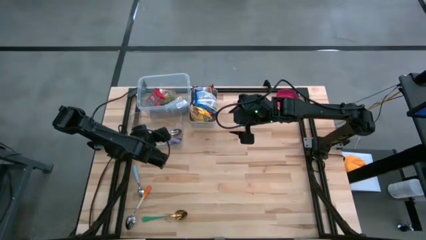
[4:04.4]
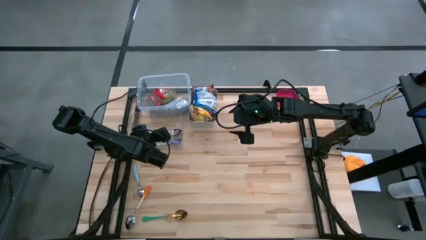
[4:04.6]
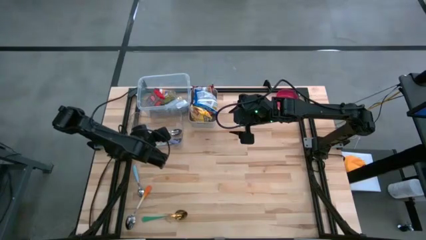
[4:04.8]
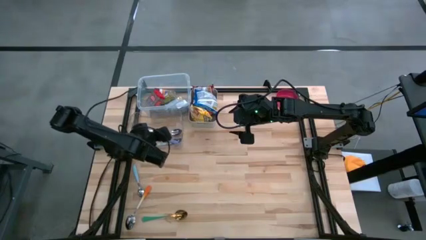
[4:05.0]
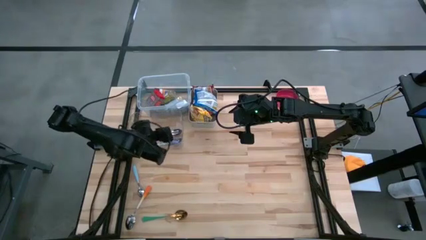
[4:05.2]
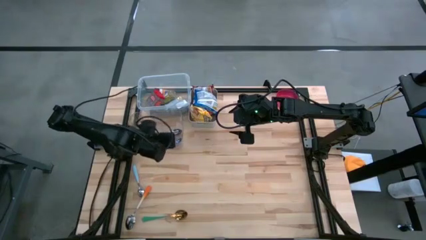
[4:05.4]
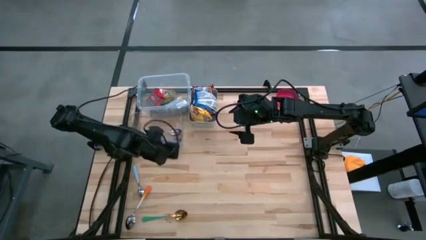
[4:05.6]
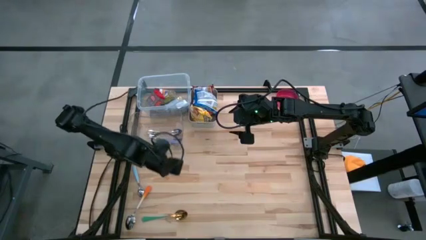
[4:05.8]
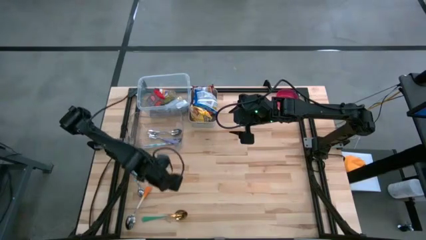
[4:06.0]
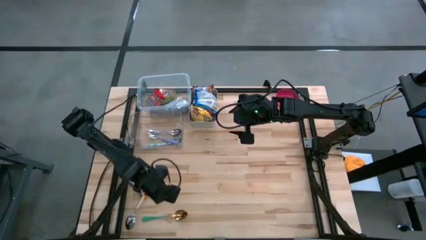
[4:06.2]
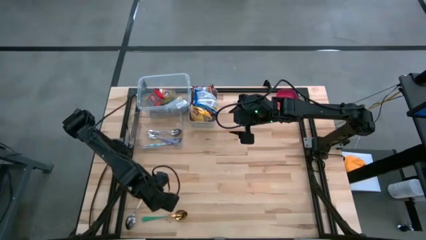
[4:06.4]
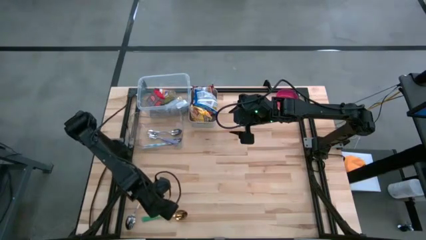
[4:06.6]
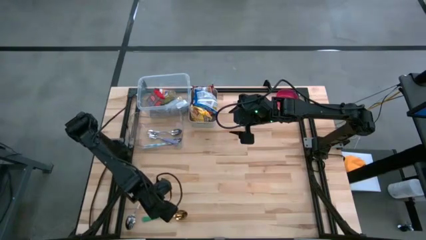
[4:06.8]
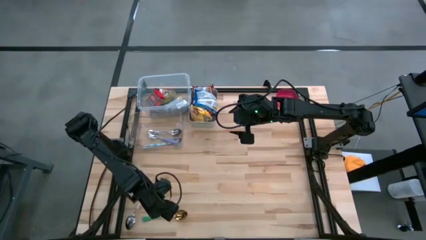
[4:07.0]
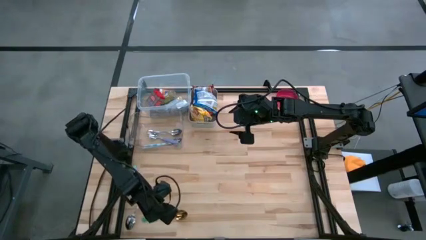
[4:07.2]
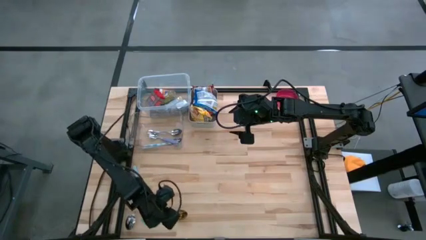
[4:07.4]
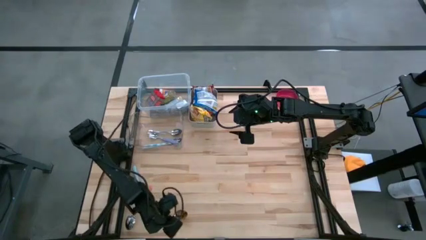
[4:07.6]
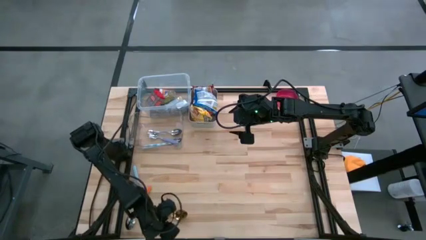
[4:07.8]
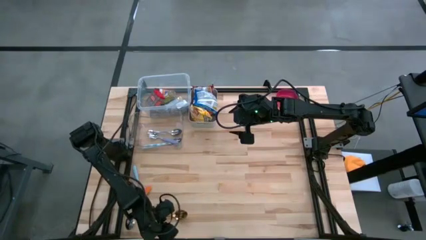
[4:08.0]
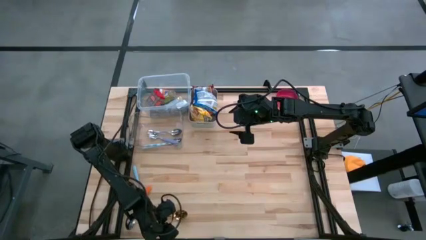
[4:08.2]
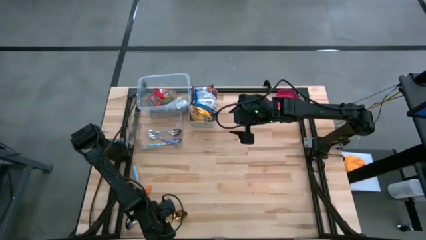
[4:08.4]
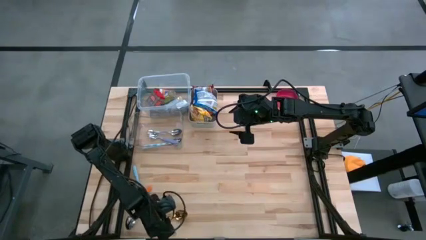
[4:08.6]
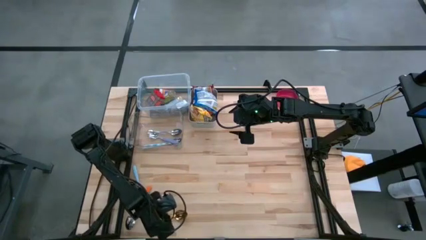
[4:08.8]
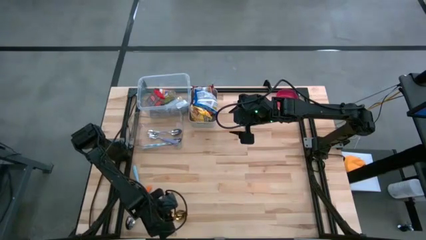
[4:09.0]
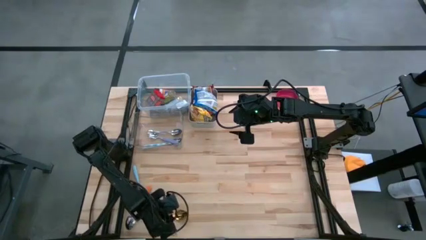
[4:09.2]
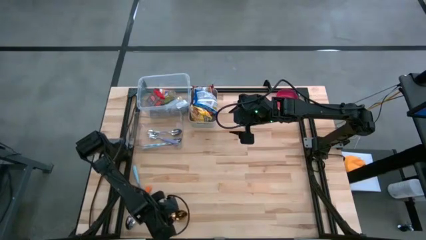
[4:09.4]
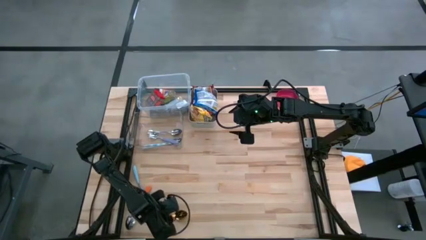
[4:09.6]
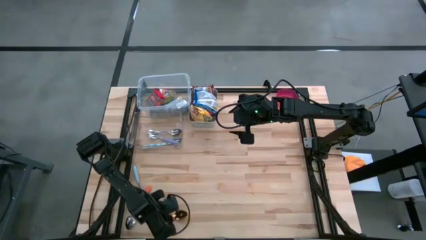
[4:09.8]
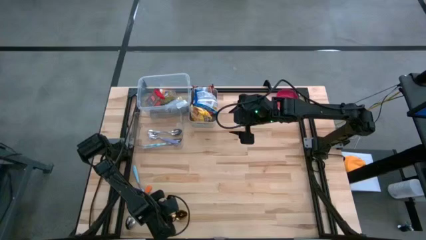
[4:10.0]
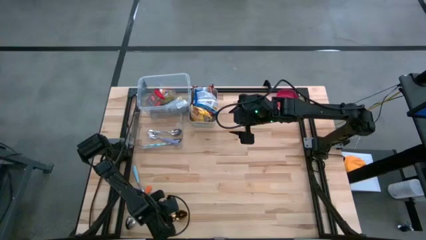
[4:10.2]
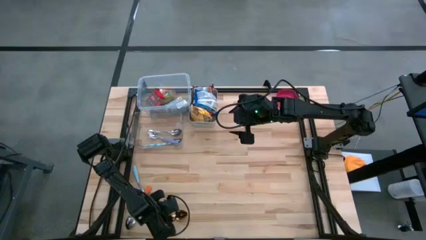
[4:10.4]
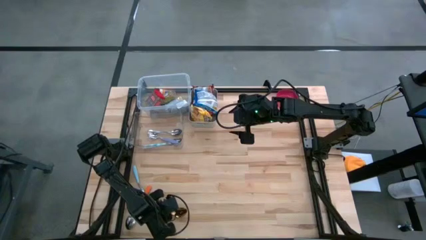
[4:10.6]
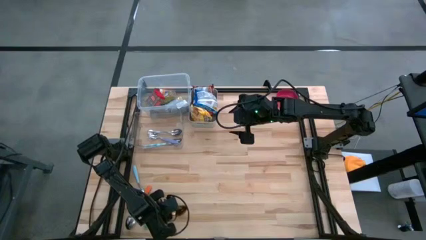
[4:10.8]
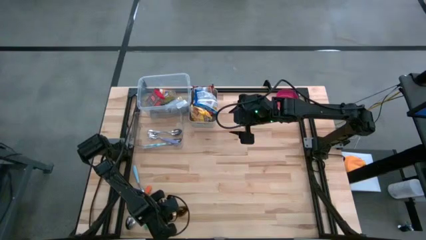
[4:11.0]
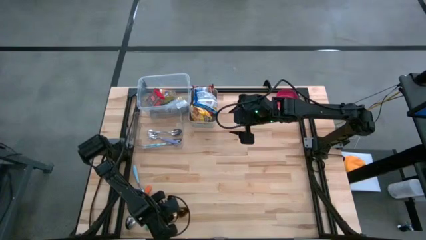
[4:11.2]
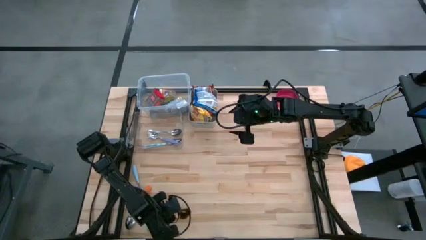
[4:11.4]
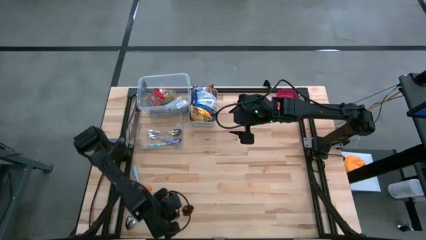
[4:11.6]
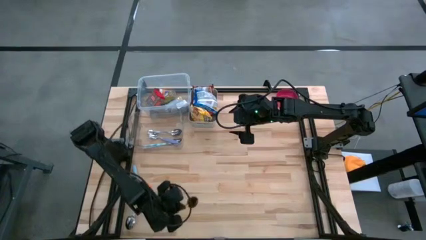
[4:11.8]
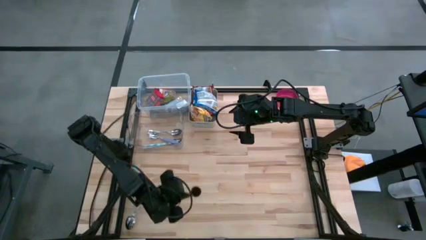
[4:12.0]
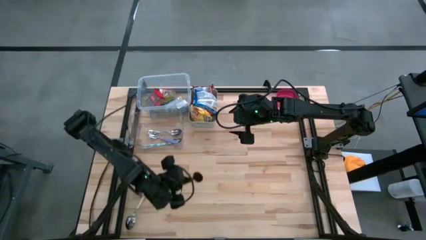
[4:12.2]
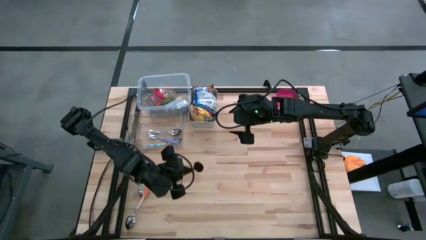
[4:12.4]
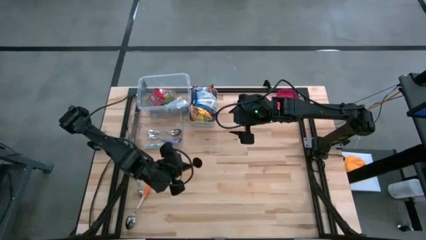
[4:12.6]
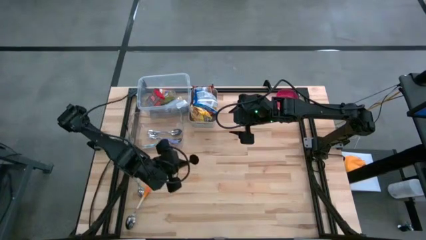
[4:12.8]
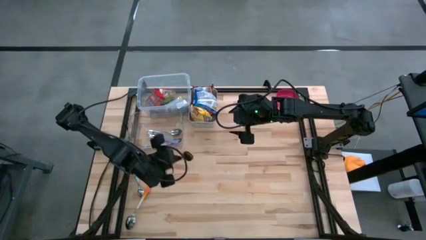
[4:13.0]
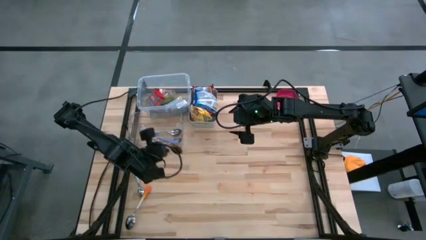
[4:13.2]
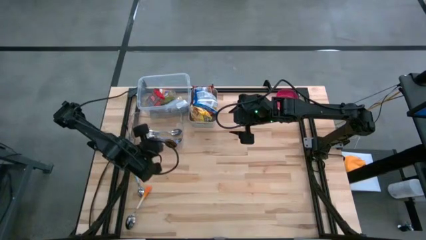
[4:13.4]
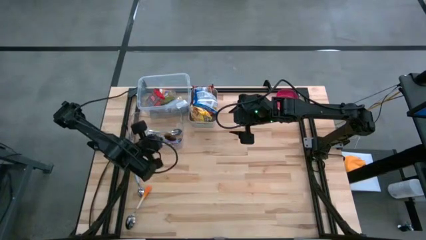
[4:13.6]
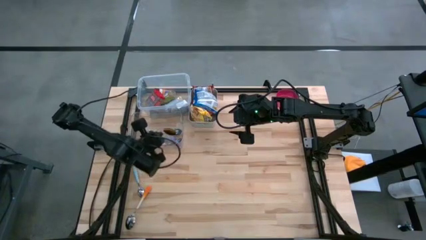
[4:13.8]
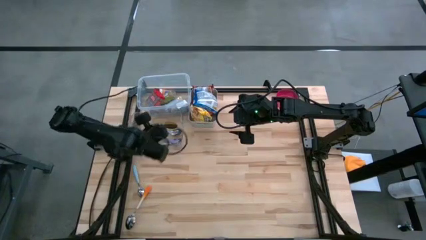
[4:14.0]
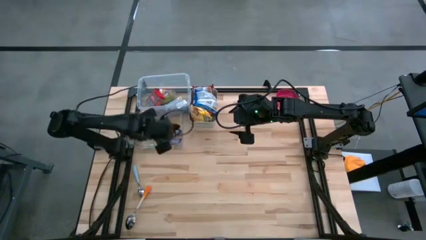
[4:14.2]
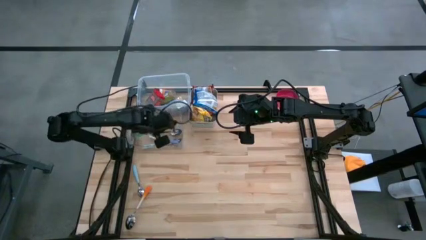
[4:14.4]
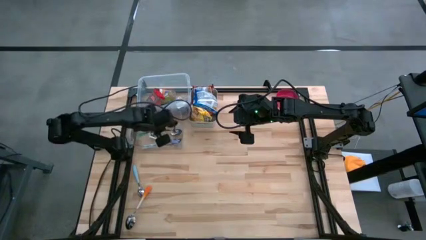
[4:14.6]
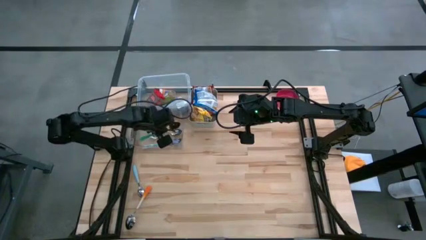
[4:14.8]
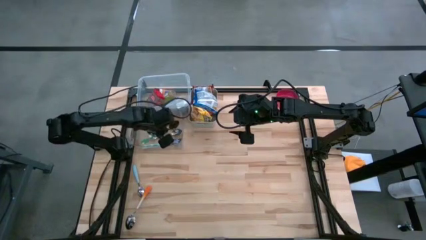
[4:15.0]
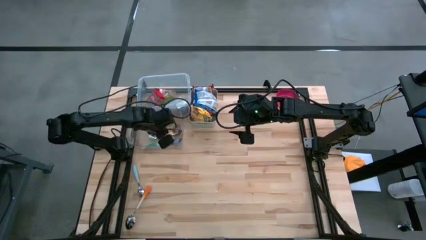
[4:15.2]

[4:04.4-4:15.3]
Put the green spoon into the transparent bin
